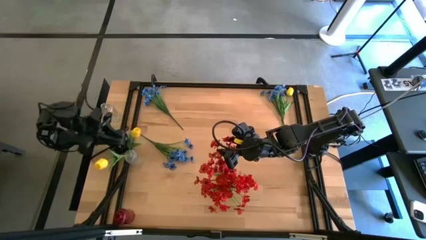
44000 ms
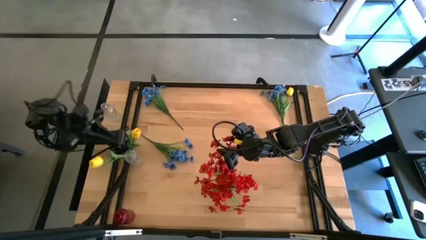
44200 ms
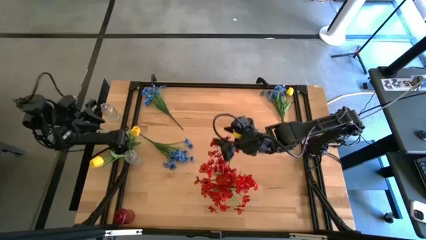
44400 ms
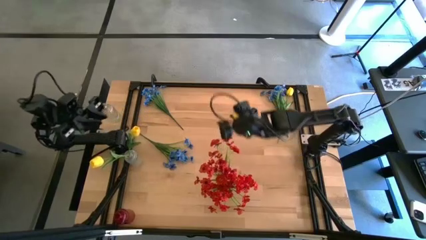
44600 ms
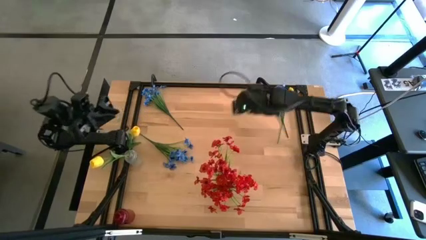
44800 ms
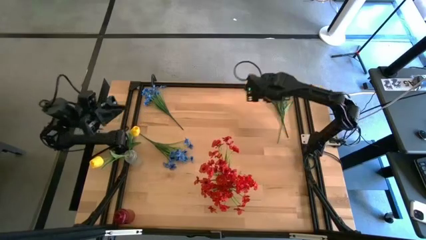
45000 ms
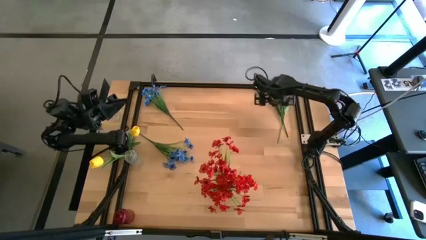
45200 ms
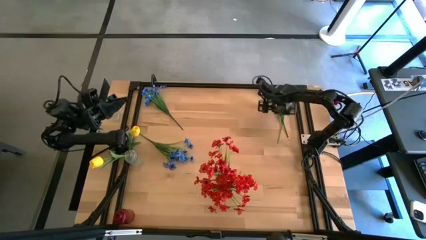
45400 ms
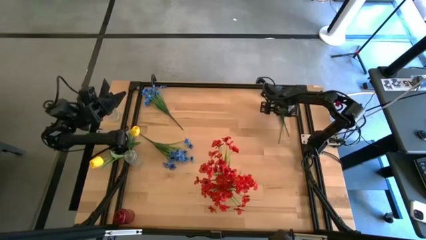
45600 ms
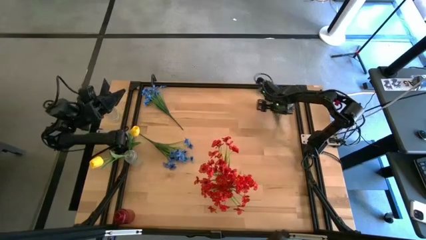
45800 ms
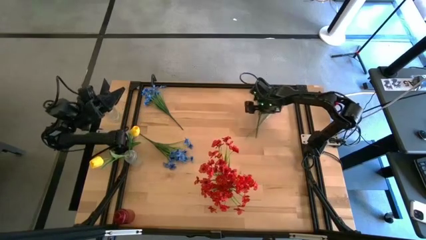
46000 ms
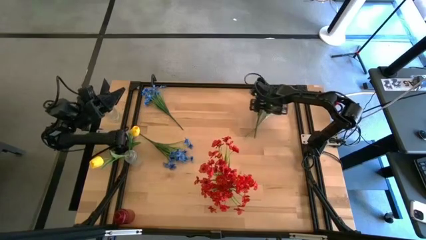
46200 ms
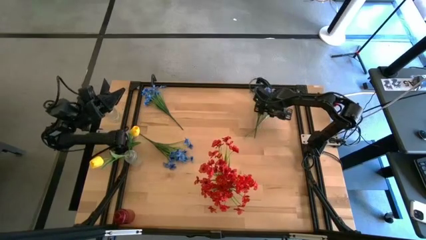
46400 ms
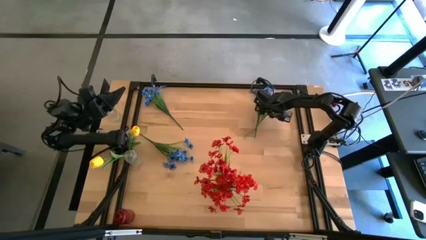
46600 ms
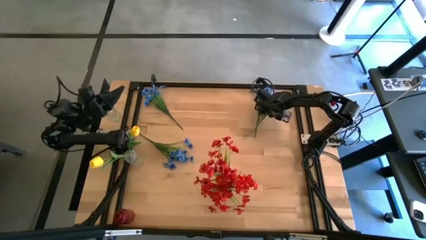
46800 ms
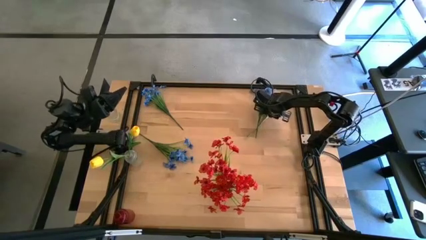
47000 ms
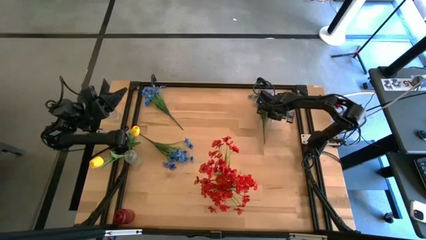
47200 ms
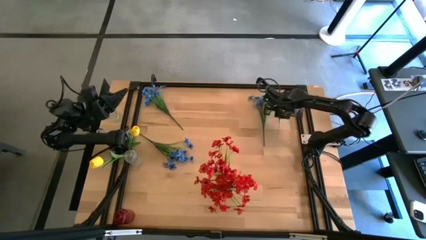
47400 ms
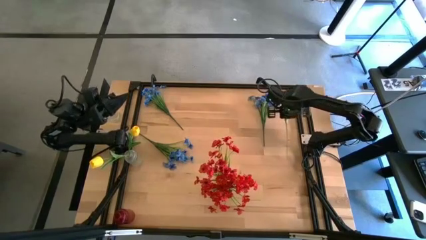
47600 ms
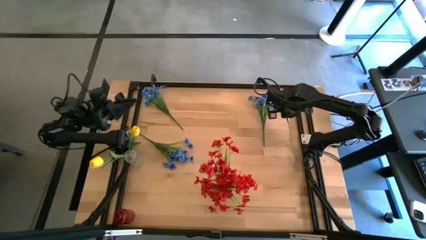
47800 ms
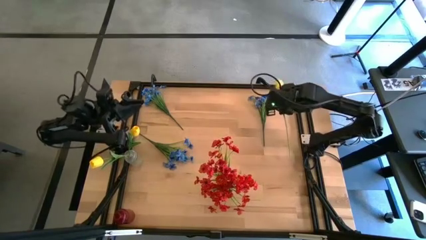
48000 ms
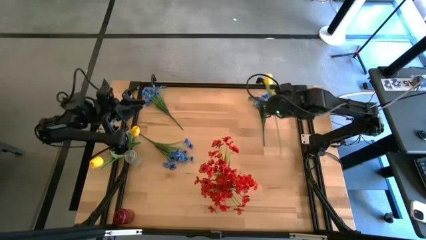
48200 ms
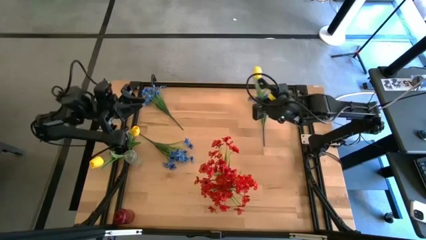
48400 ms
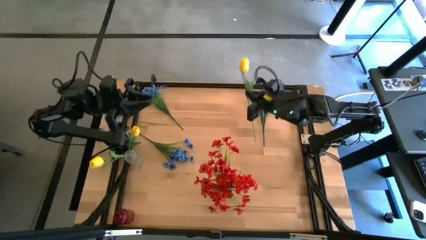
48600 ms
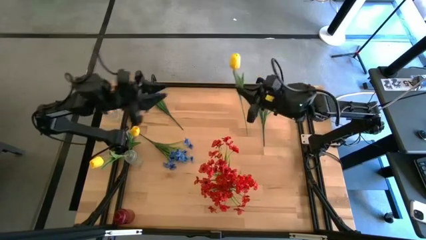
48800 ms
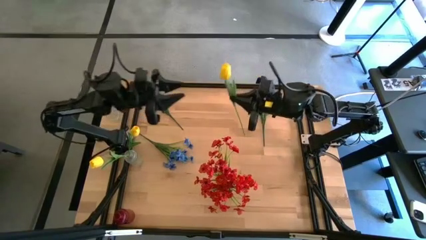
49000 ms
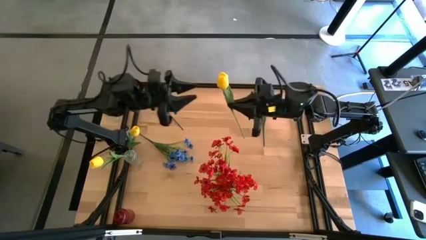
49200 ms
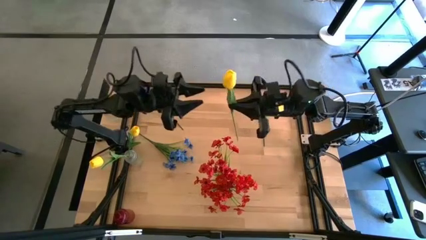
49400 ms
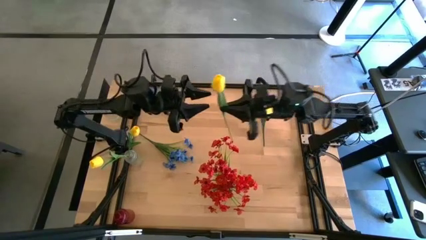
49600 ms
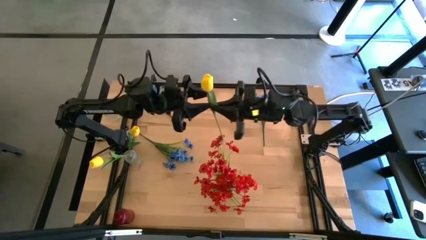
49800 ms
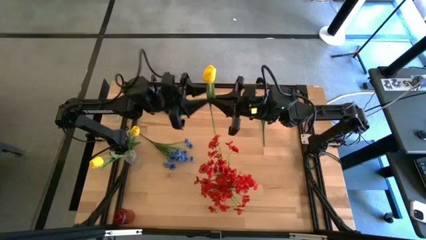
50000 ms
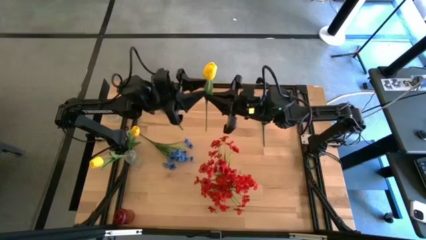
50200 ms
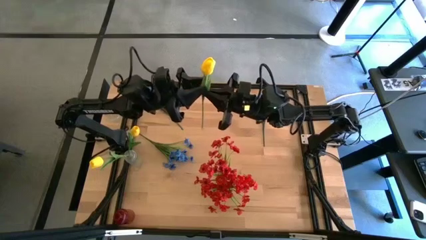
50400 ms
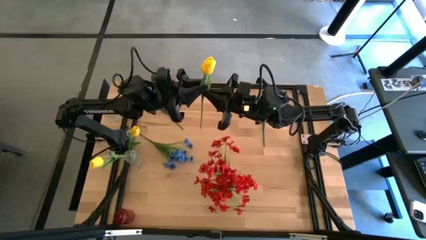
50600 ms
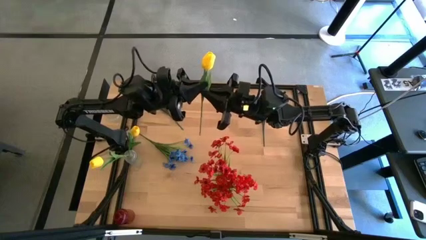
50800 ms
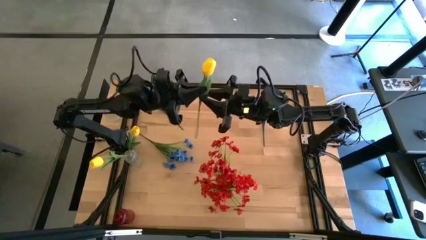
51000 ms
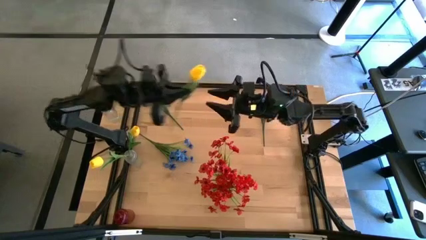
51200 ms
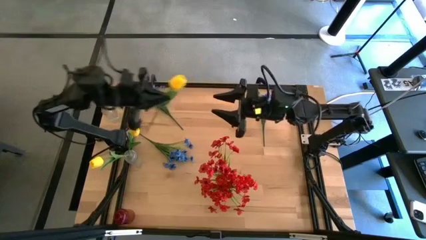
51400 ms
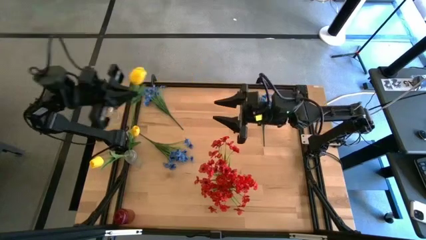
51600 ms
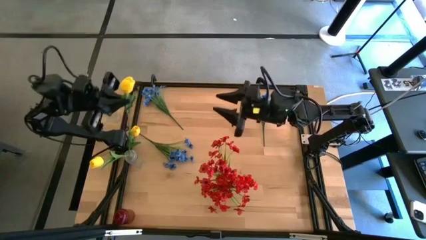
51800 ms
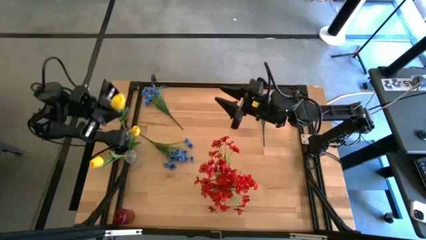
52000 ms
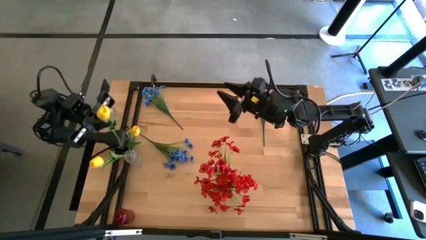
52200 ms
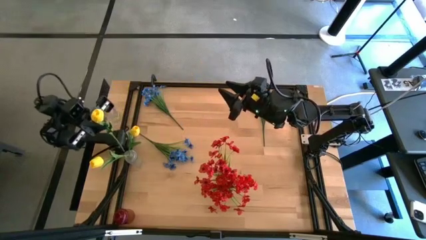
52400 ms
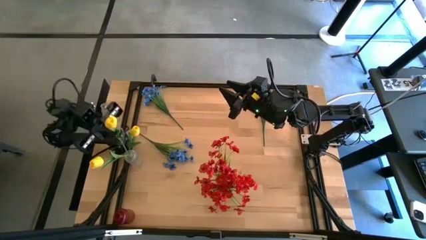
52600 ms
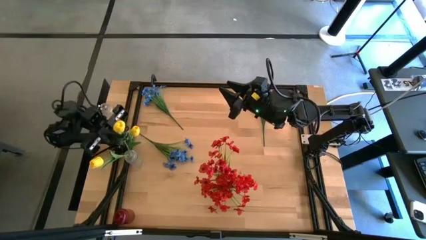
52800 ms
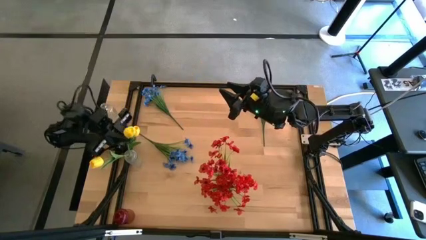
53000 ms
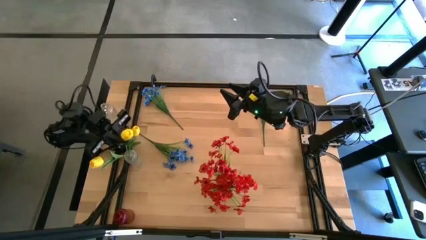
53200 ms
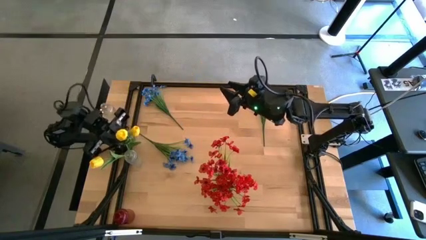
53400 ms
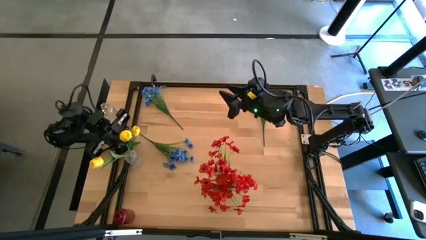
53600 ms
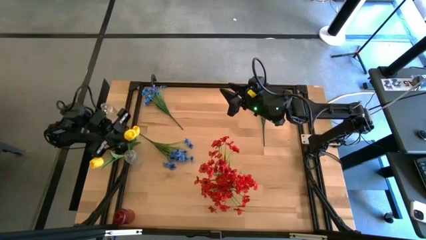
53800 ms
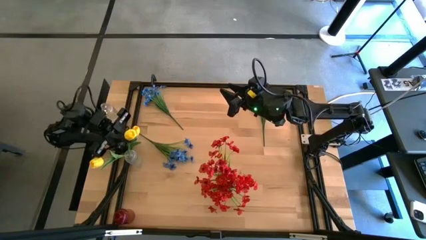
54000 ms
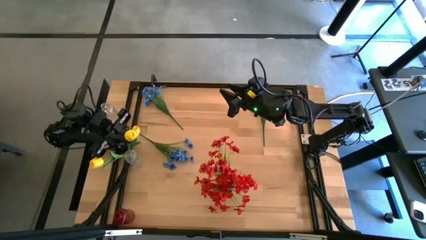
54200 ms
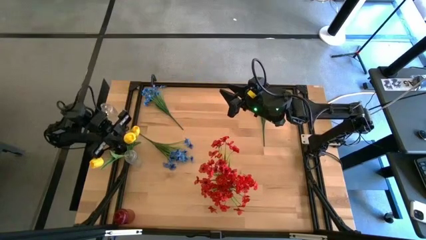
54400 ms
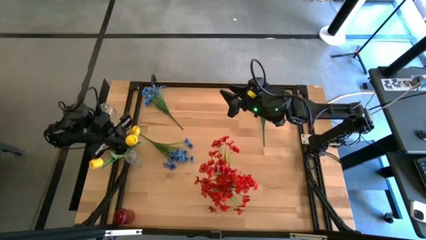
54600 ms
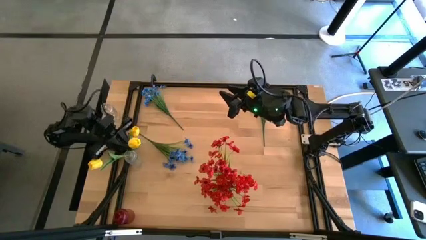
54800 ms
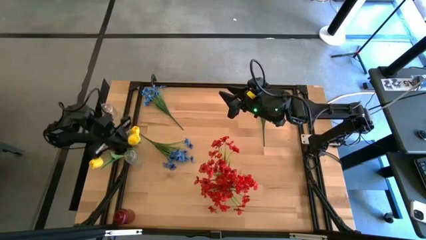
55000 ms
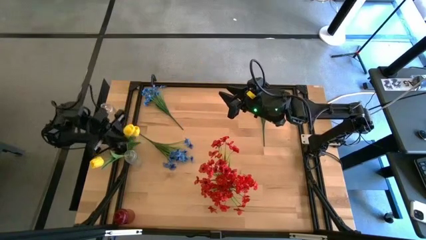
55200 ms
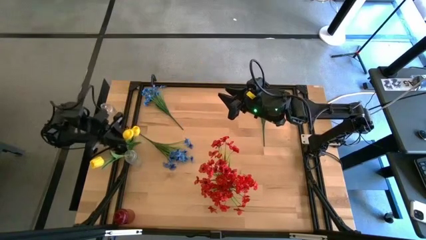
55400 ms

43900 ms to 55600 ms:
Task: Sort flowers into vase by color
Put the yellow tulip into the transparent vase

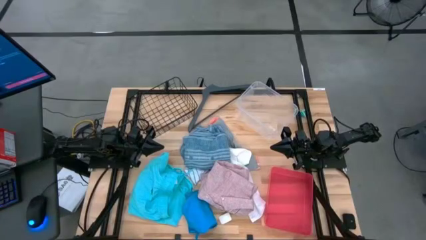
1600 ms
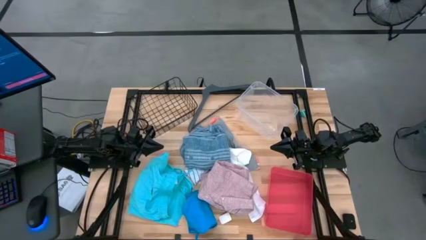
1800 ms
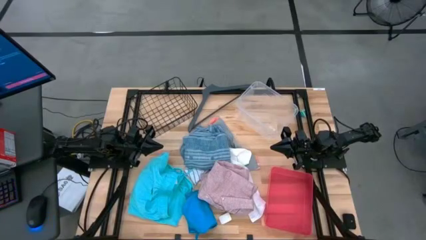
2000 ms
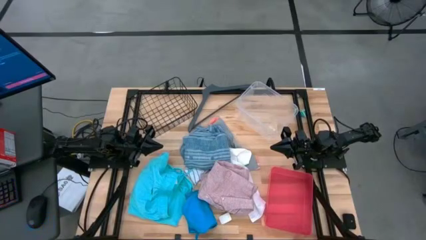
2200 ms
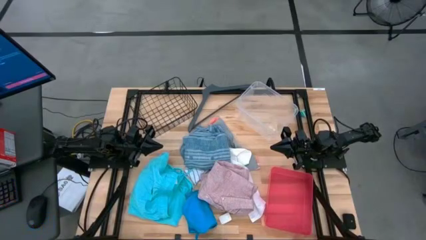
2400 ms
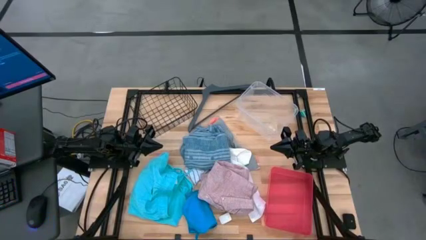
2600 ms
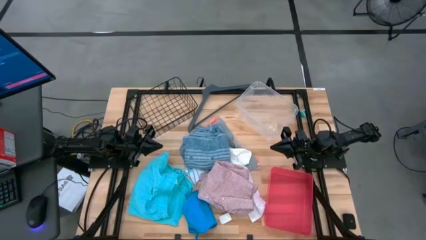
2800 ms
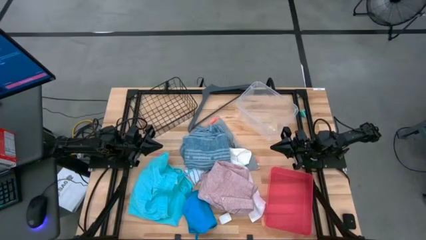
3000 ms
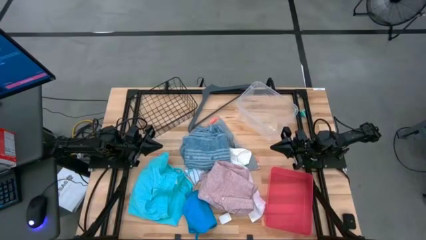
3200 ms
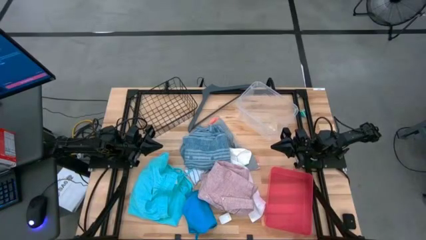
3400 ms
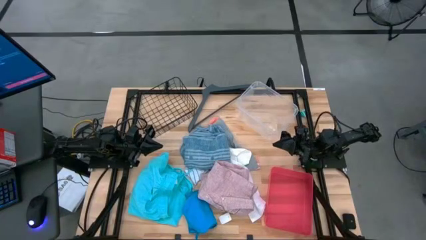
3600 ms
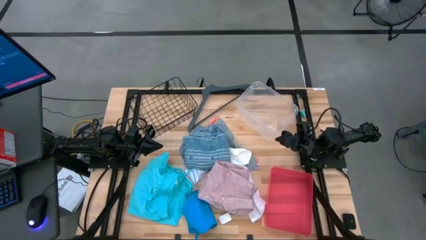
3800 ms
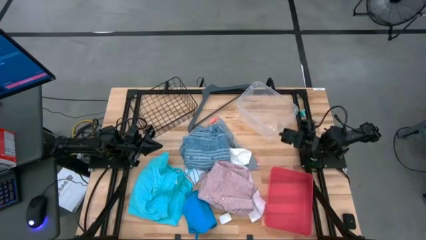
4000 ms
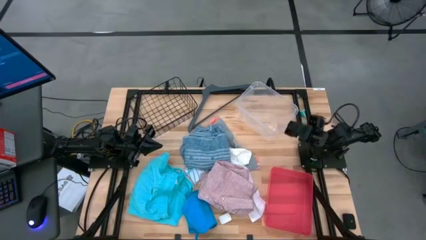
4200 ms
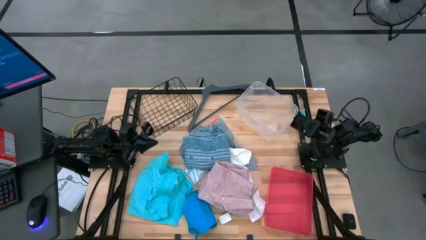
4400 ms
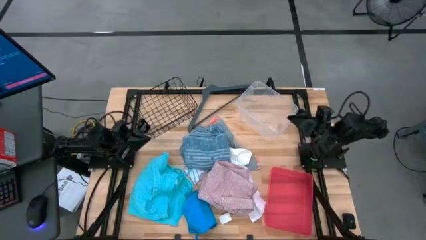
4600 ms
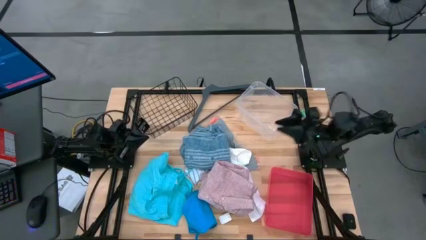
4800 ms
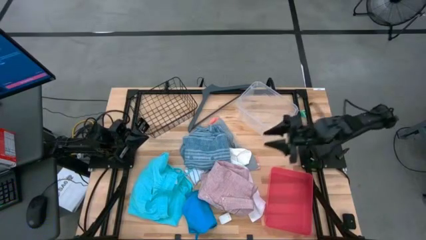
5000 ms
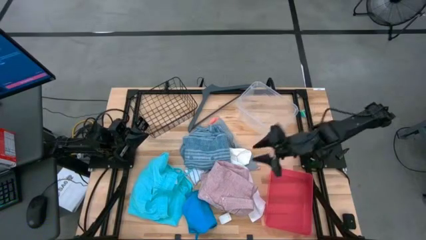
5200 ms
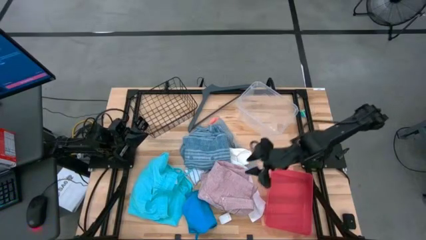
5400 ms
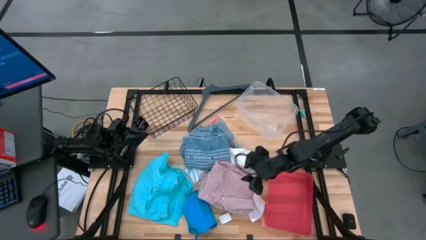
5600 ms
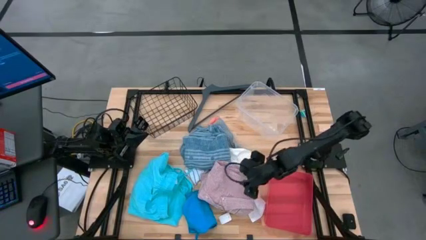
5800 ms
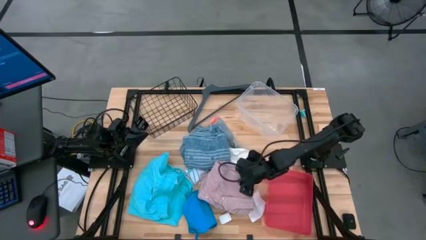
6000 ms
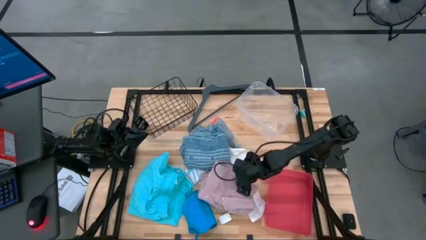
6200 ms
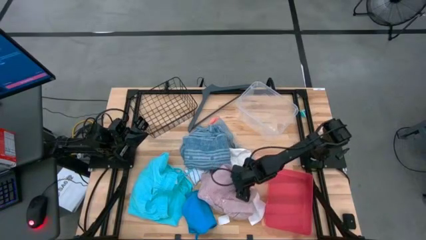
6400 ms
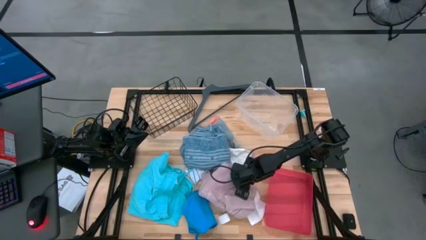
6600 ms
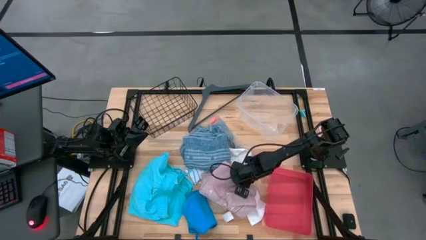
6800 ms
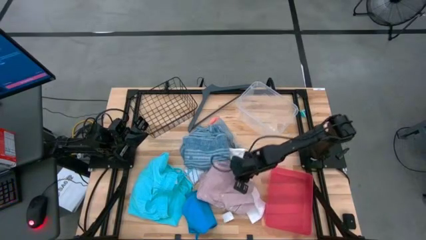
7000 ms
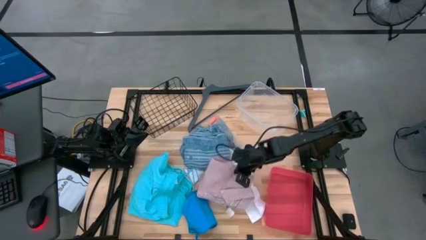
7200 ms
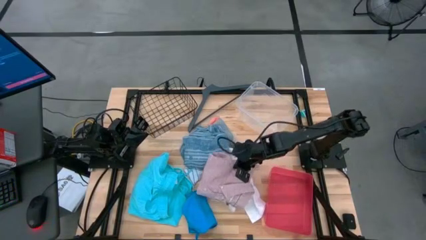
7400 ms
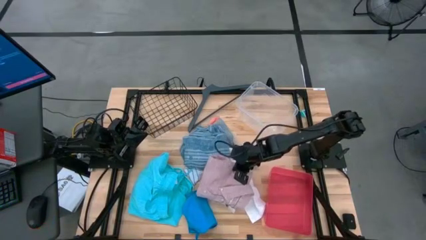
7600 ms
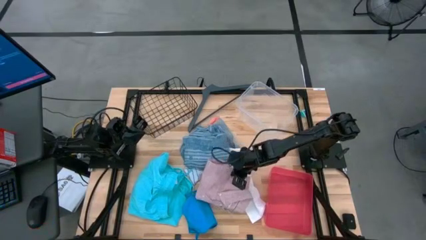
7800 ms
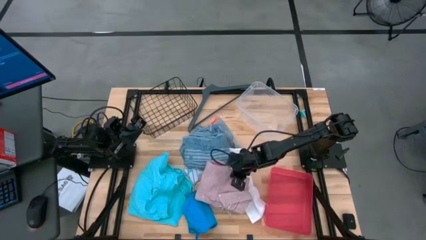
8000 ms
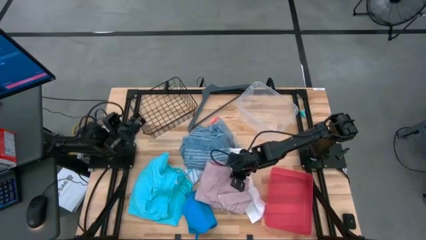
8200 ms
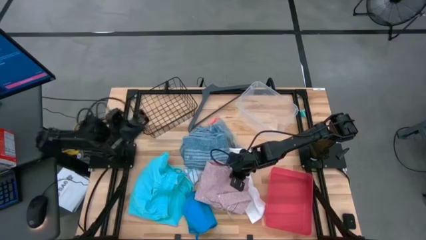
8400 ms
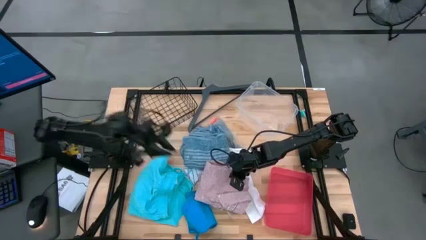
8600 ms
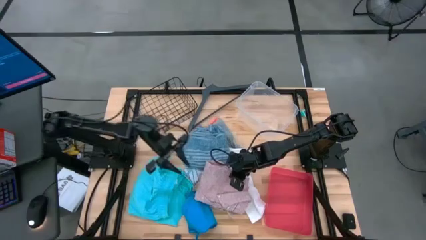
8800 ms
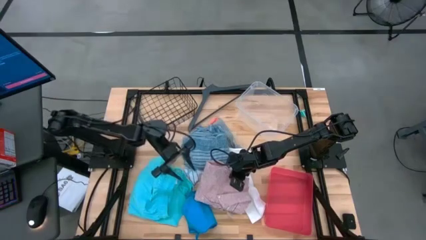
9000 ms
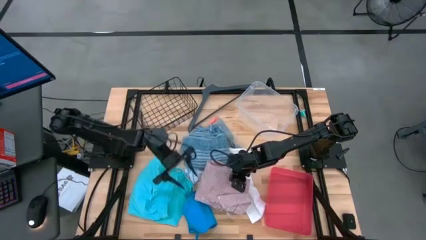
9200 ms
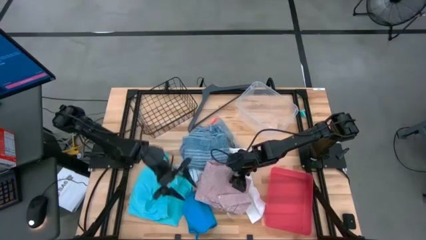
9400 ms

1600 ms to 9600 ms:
Task: Pick & Place Cloths
Put the pink polo shirt into the wire basket
